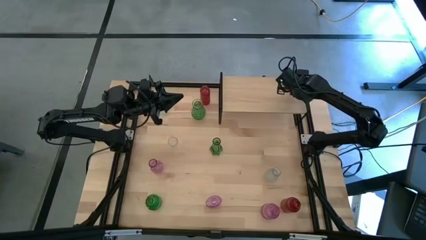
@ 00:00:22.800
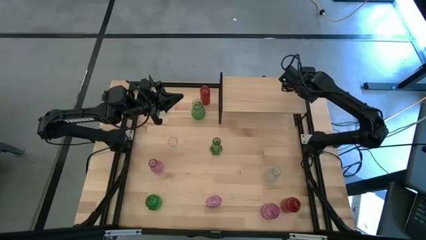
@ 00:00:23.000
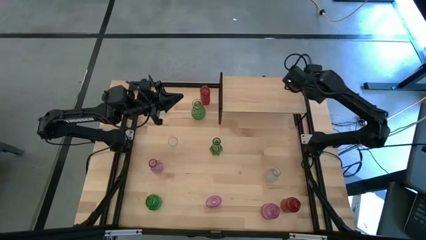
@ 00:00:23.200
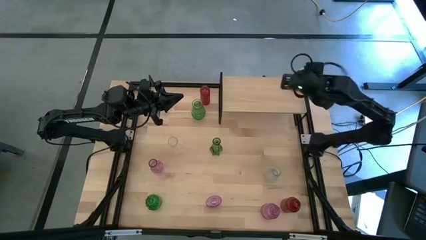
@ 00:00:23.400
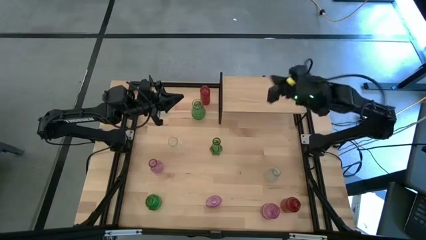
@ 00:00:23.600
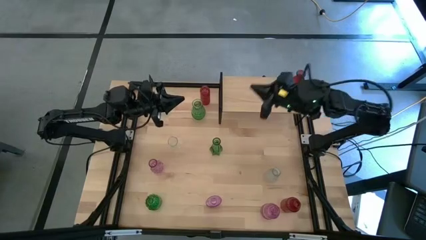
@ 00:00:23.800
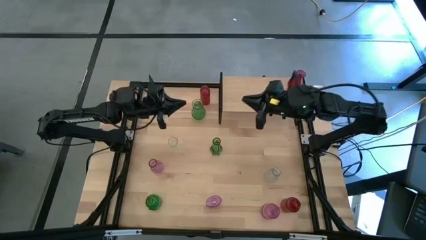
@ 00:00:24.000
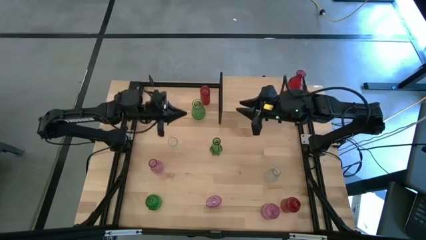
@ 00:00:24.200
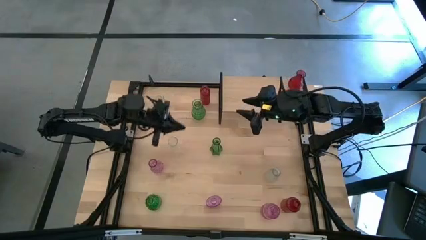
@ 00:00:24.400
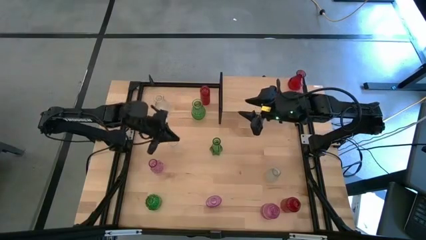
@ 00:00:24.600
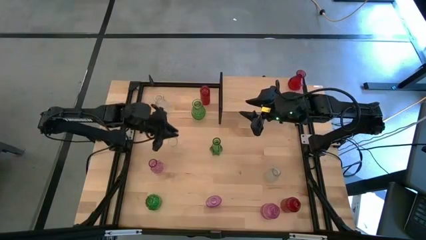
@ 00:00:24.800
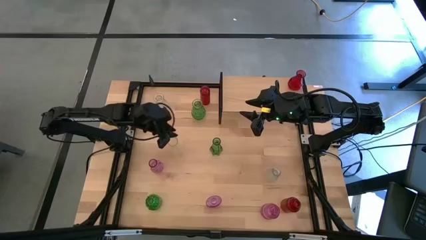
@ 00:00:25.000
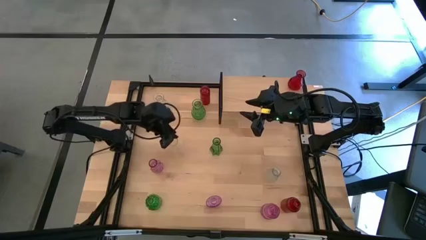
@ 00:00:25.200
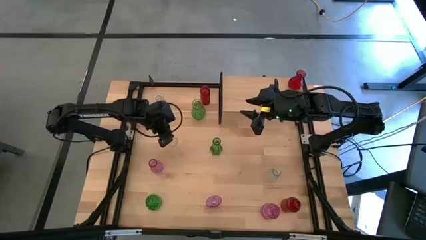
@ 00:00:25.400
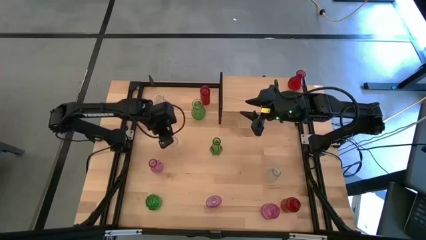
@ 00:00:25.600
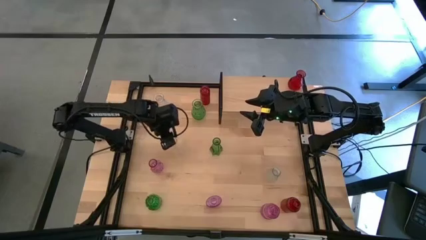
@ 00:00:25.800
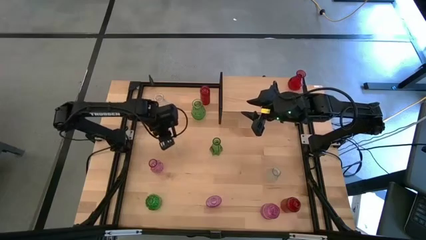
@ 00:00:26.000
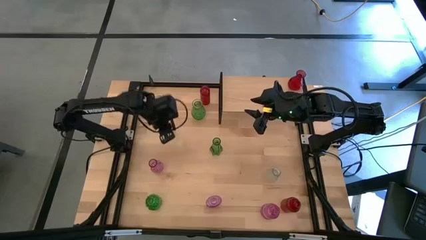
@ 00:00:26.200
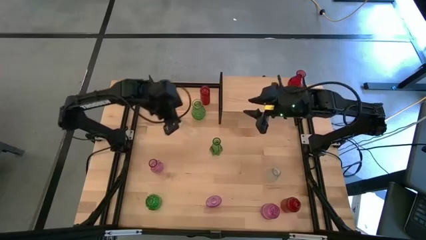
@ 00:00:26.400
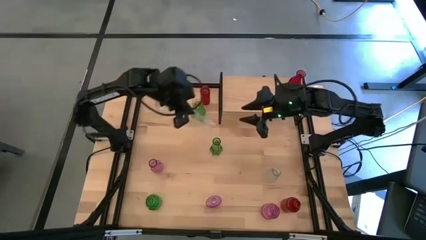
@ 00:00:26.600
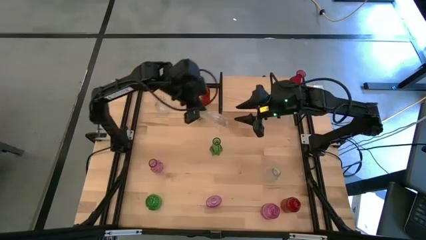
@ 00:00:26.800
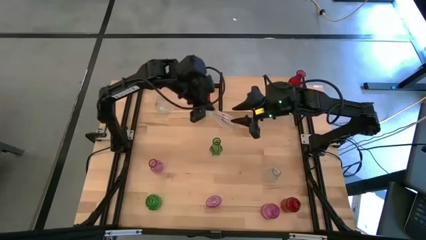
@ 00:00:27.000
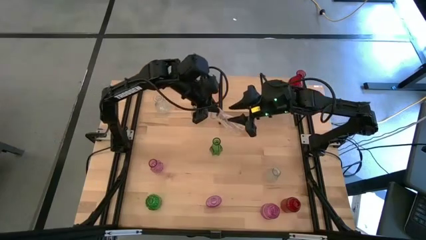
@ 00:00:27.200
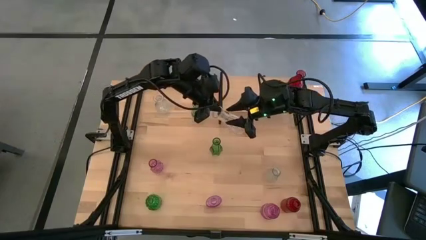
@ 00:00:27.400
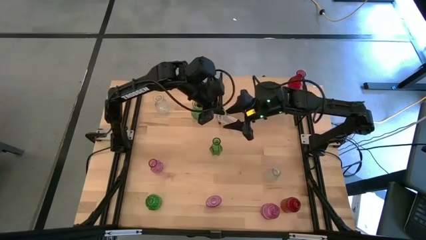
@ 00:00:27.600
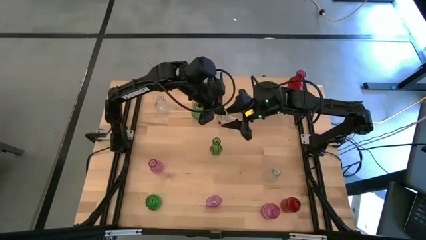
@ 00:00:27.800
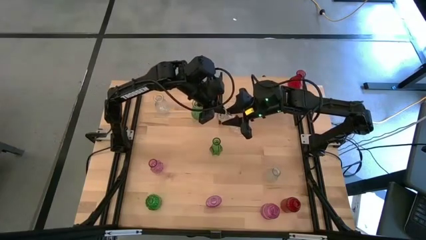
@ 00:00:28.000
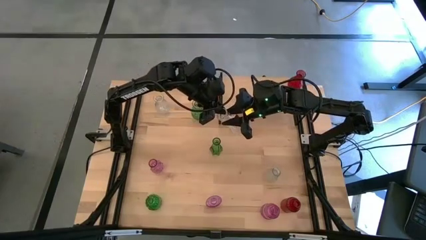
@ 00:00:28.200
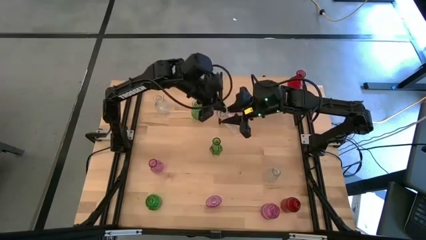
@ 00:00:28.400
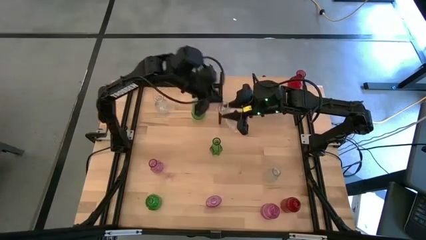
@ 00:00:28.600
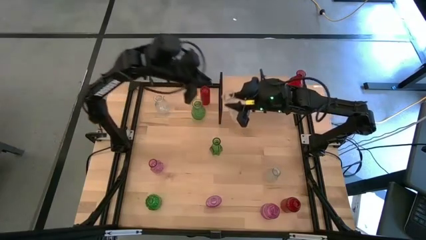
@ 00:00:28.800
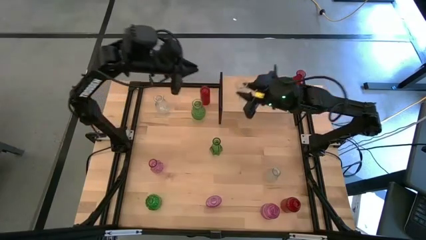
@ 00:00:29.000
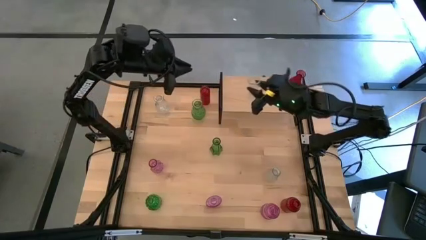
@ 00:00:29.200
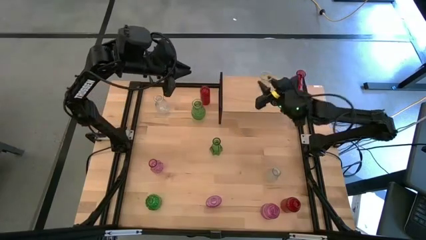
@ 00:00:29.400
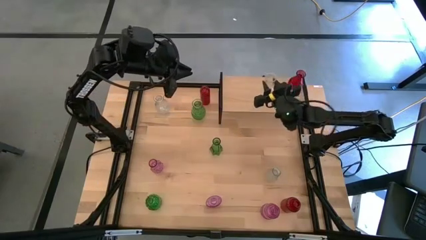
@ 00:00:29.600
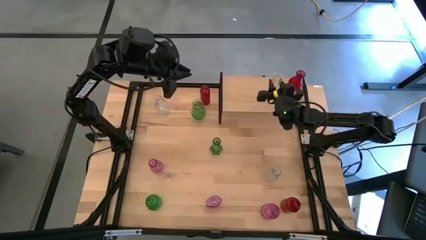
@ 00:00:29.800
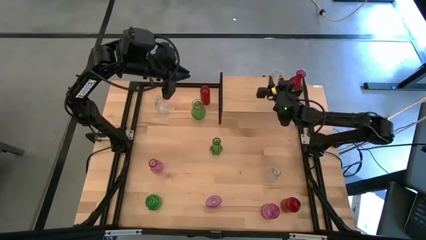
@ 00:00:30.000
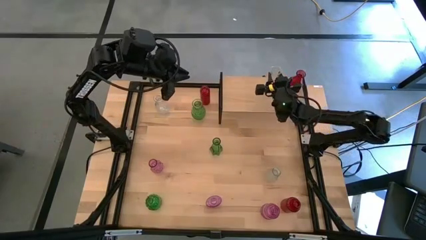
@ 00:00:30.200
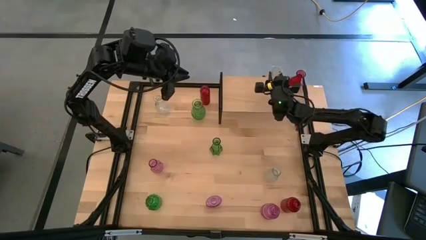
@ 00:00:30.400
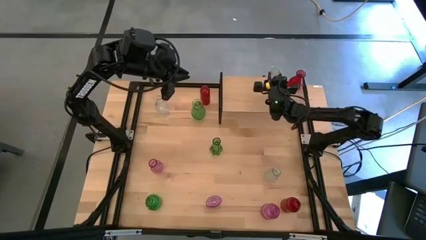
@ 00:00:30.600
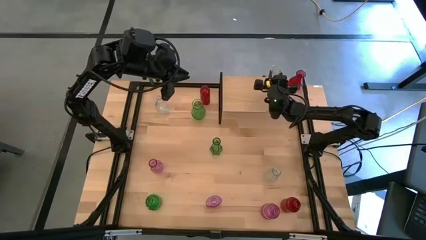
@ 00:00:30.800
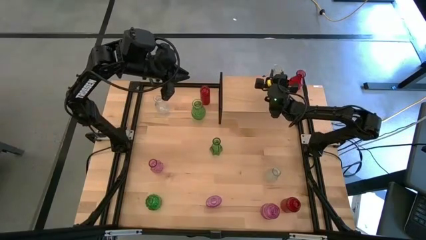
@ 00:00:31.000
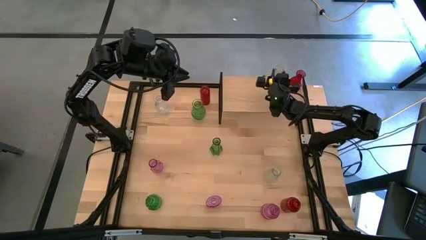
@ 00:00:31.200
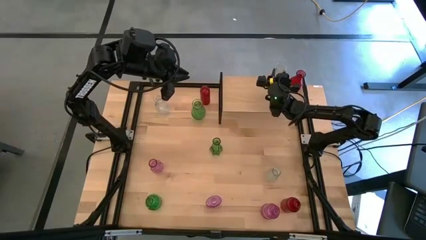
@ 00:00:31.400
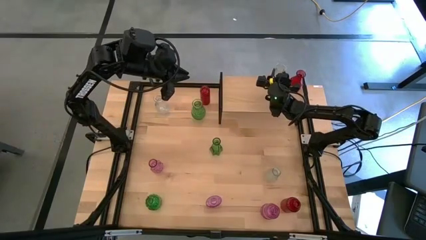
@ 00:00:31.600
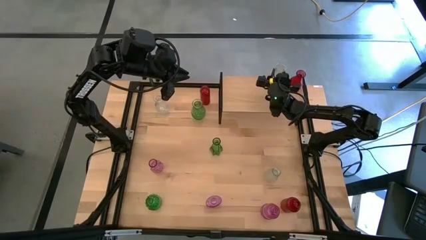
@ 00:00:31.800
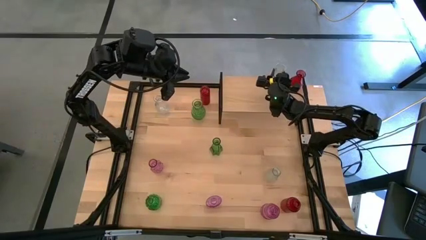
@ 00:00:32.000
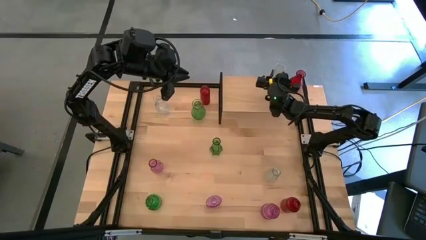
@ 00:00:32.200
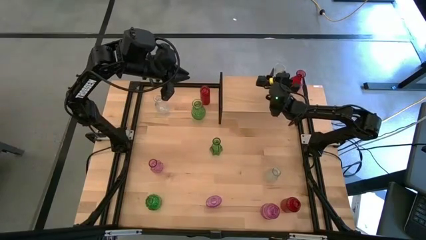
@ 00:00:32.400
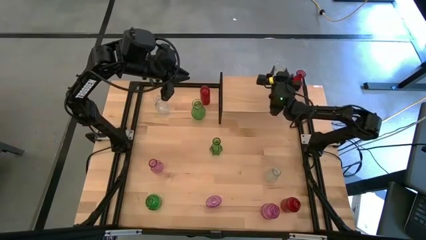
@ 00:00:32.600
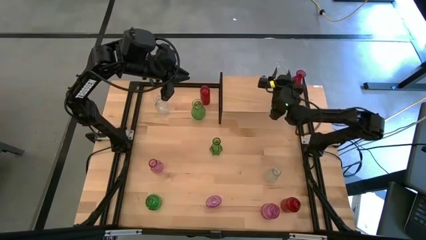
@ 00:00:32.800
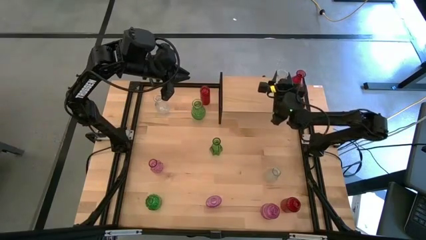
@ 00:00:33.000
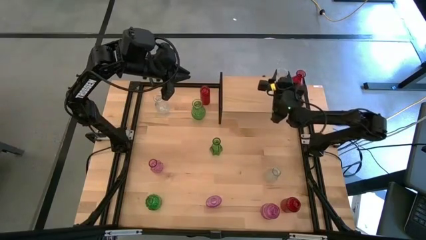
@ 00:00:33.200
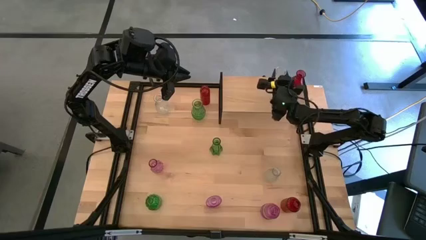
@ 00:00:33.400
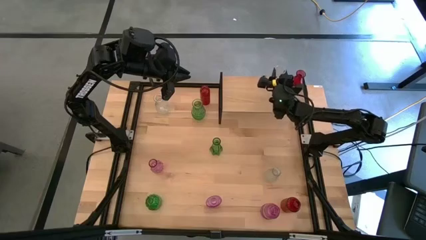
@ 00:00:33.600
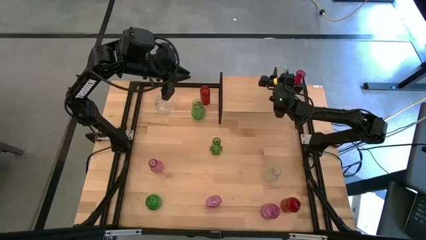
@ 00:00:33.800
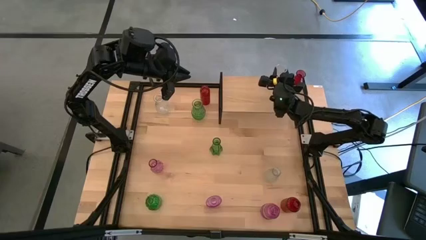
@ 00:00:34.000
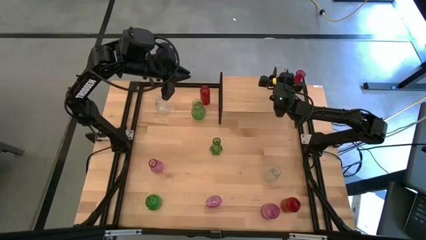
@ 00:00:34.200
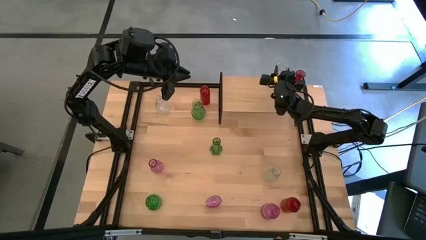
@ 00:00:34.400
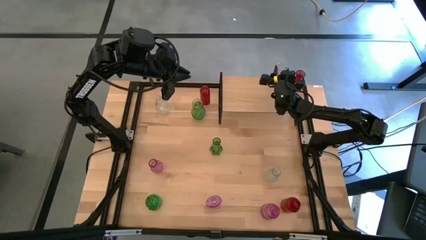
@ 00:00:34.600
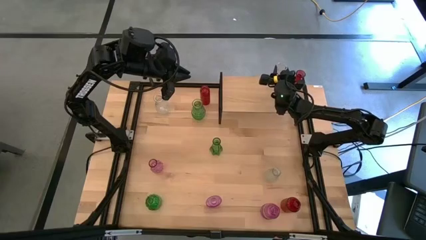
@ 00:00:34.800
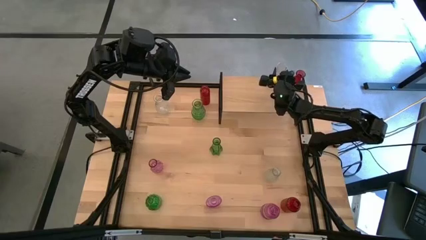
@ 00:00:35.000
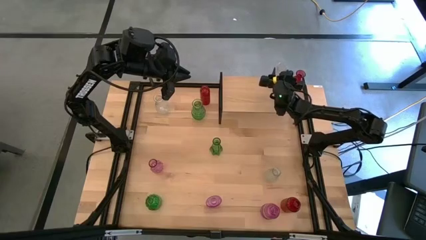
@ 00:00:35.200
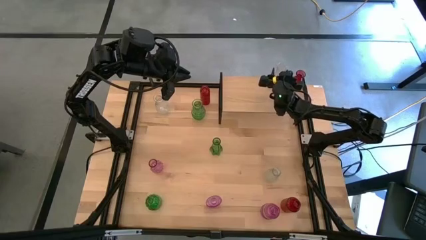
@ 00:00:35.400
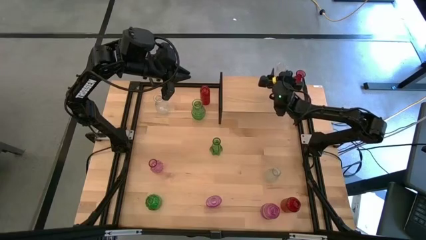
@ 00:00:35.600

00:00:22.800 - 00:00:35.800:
Task: sort vases onto shelf
Put the middle left transparent vase on the shelf

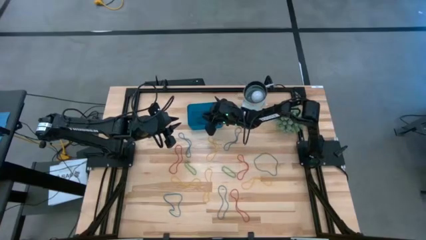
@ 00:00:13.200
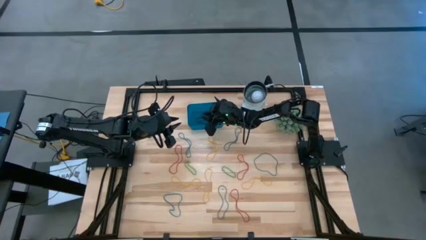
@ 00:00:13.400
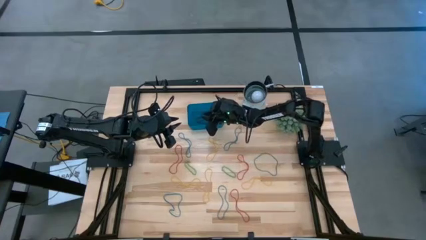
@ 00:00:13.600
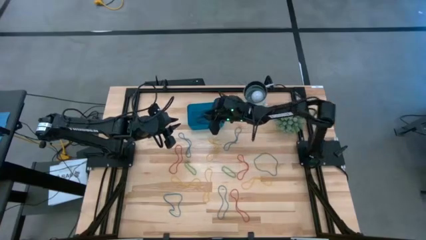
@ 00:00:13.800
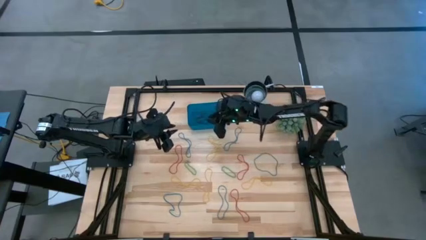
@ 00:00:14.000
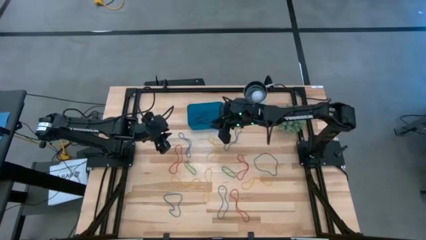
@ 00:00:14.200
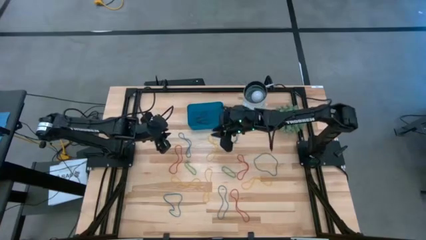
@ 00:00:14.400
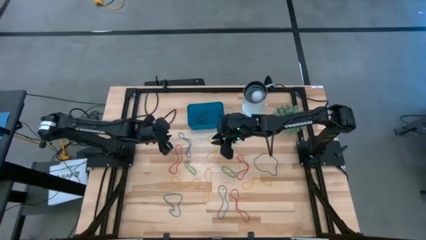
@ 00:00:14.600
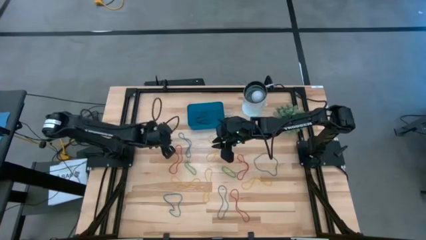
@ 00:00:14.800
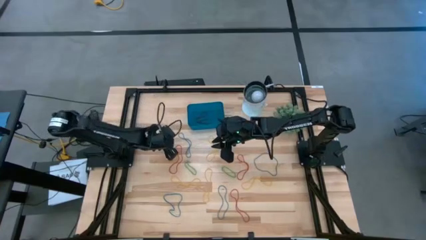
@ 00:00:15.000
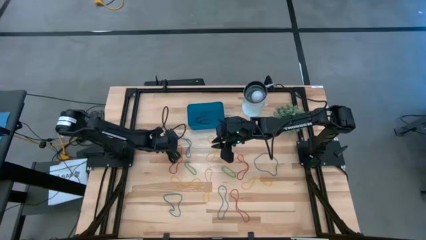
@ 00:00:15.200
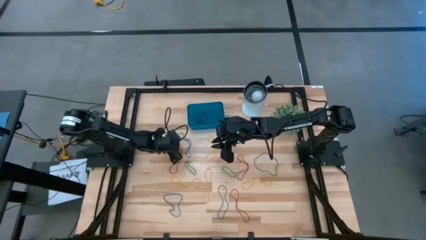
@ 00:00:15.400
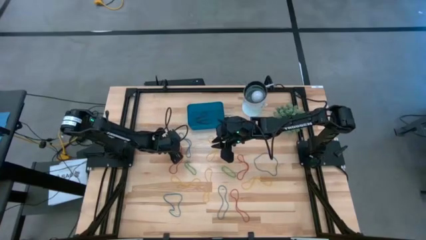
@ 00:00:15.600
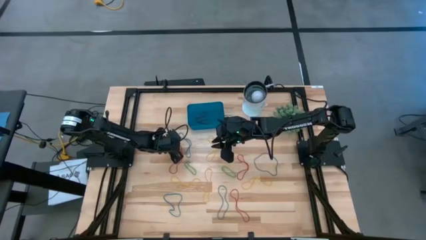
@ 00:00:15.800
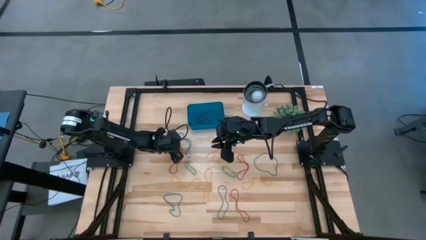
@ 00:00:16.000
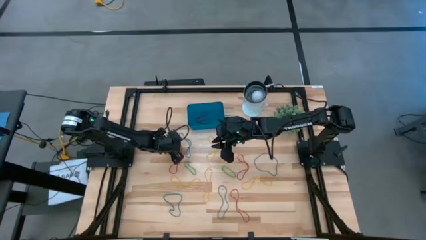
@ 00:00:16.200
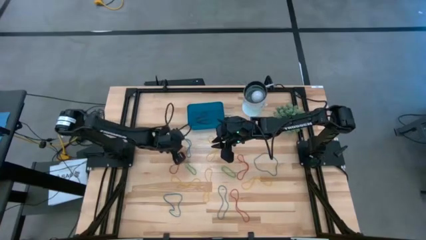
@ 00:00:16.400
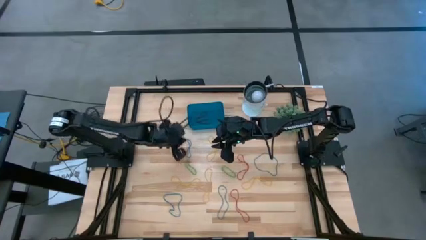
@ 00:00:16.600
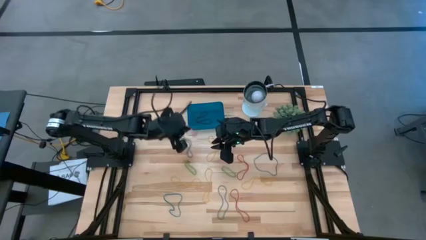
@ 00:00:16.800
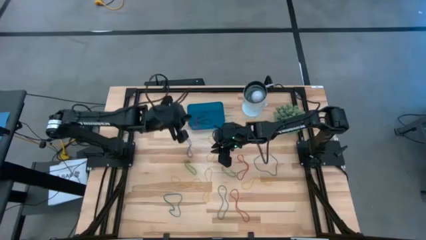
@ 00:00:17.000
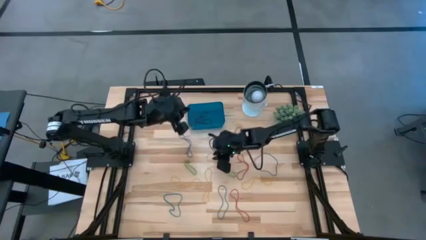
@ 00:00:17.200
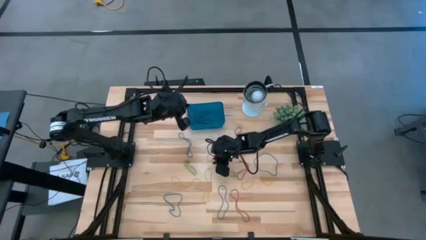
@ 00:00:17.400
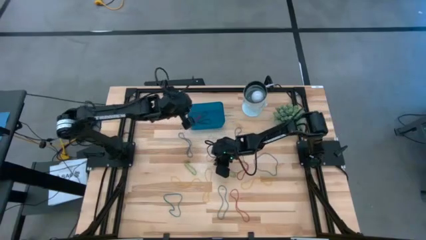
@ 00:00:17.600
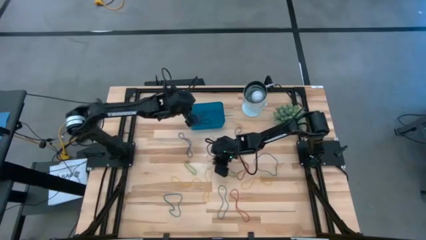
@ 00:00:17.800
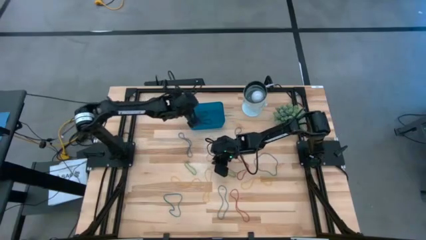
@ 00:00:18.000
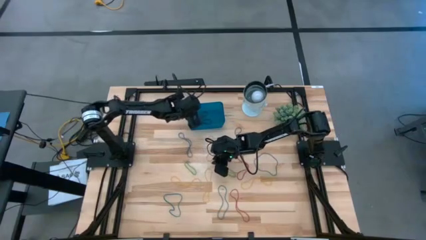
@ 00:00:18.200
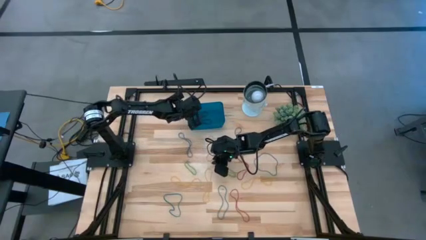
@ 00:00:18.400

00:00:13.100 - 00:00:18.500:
Task: Pick and place items into bin
Put the red rubber band into the blue bin
